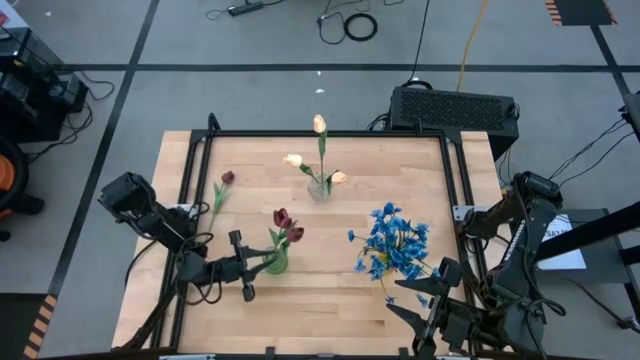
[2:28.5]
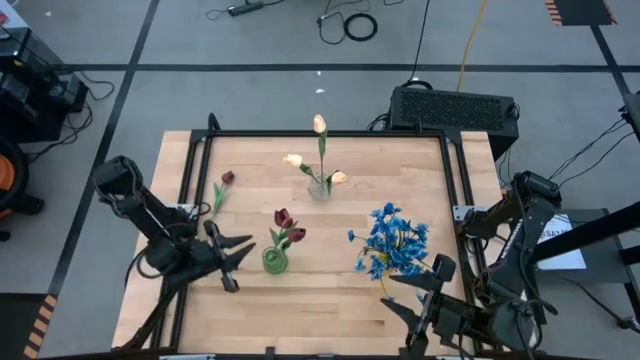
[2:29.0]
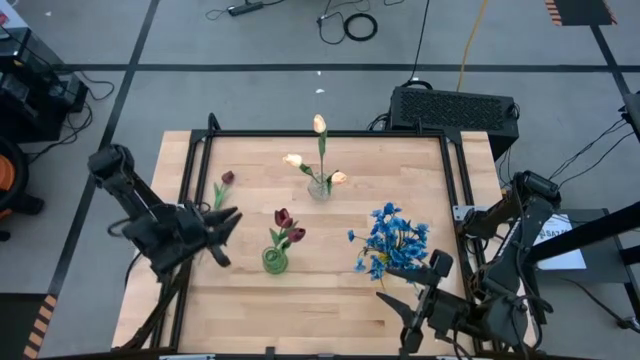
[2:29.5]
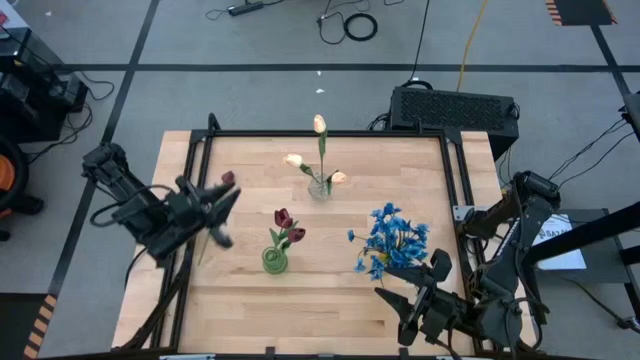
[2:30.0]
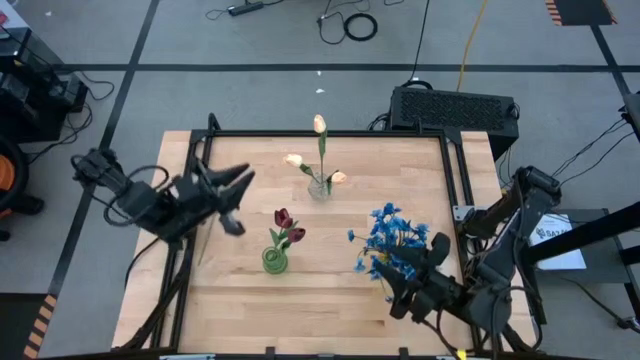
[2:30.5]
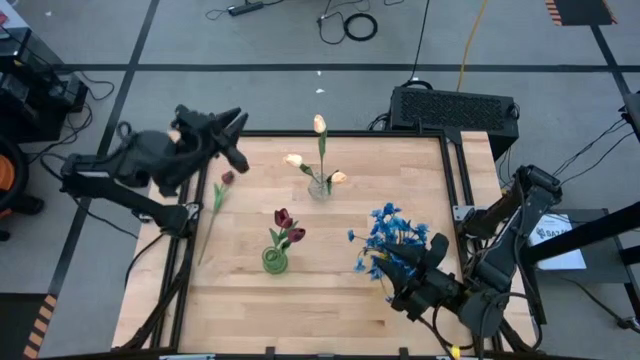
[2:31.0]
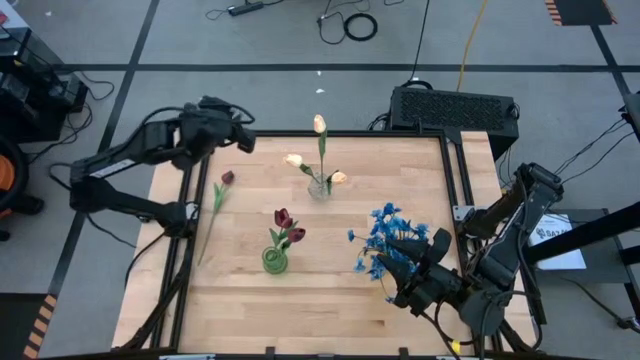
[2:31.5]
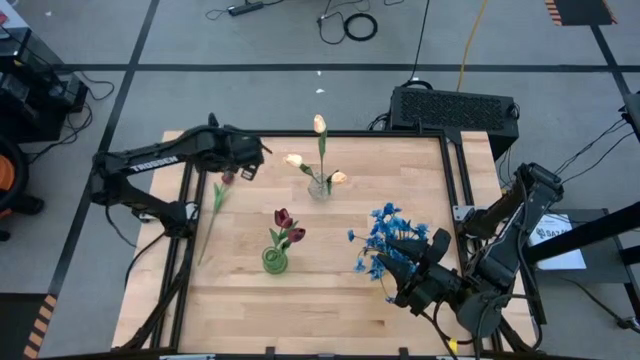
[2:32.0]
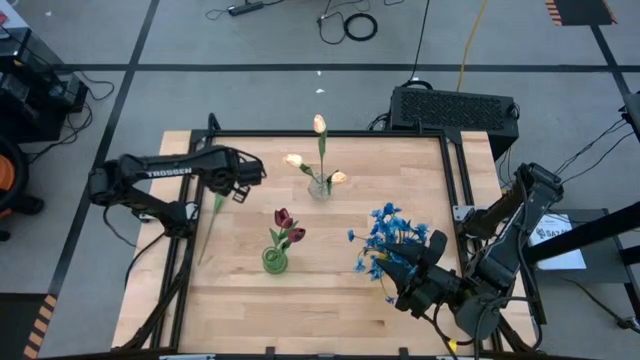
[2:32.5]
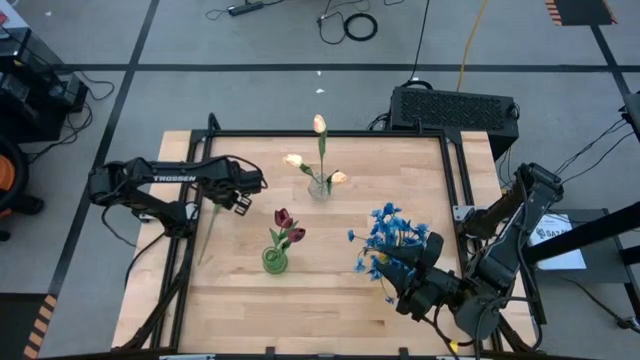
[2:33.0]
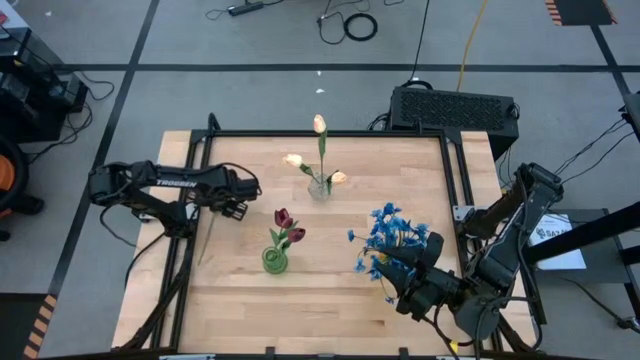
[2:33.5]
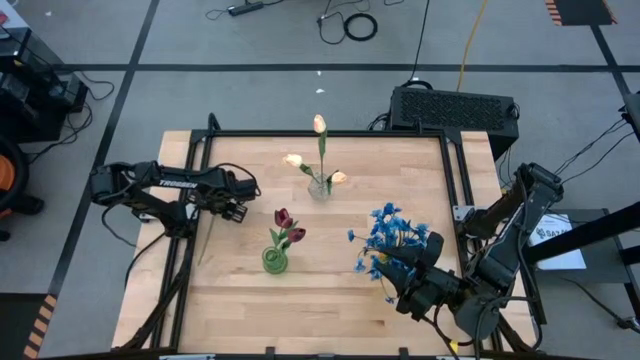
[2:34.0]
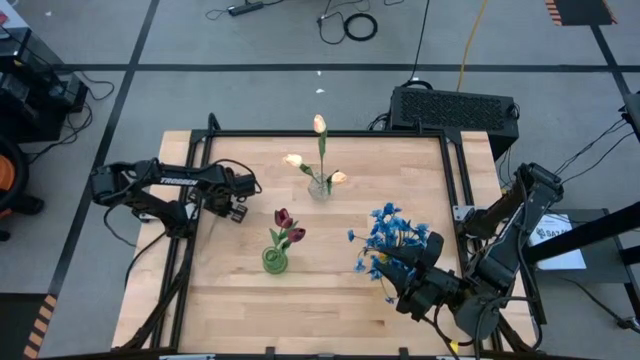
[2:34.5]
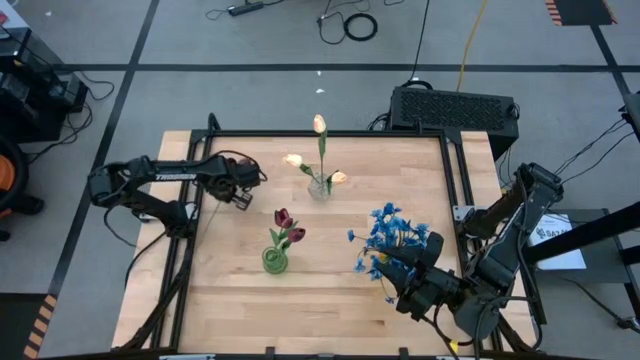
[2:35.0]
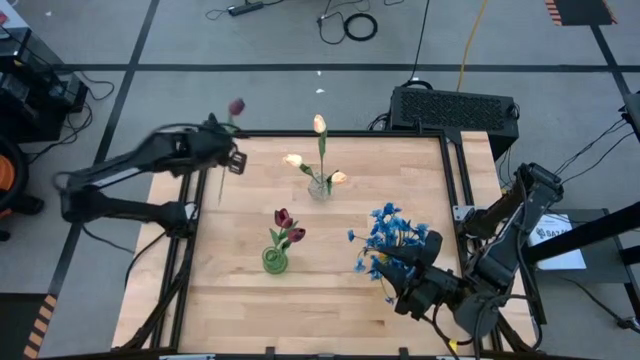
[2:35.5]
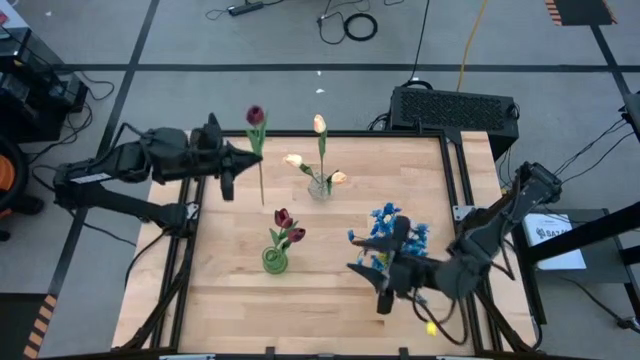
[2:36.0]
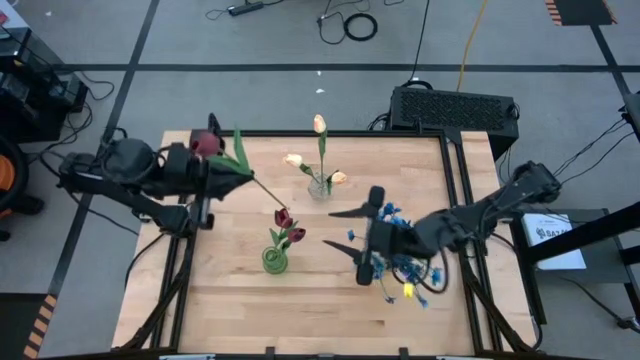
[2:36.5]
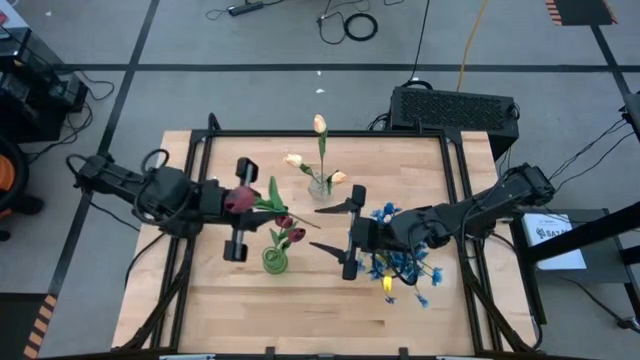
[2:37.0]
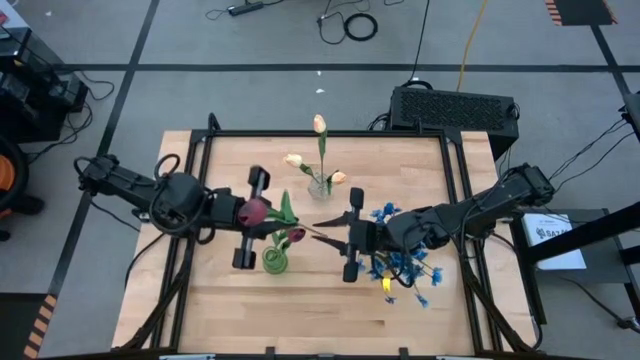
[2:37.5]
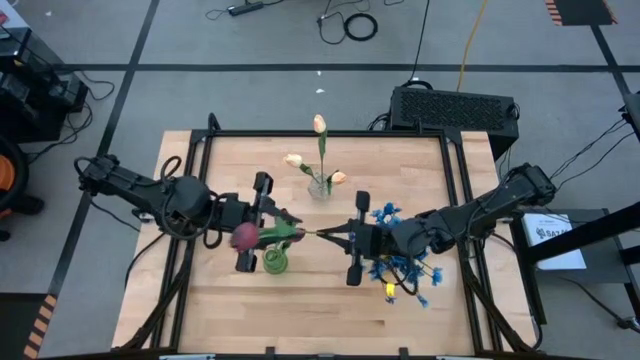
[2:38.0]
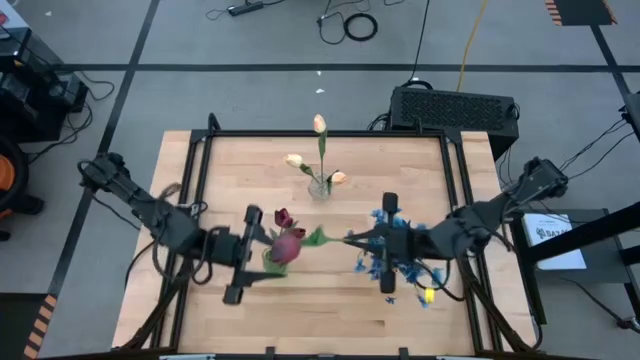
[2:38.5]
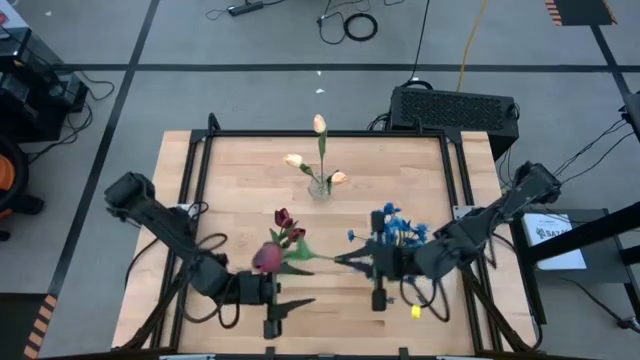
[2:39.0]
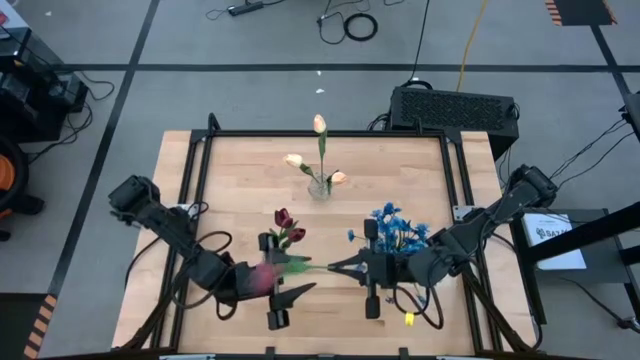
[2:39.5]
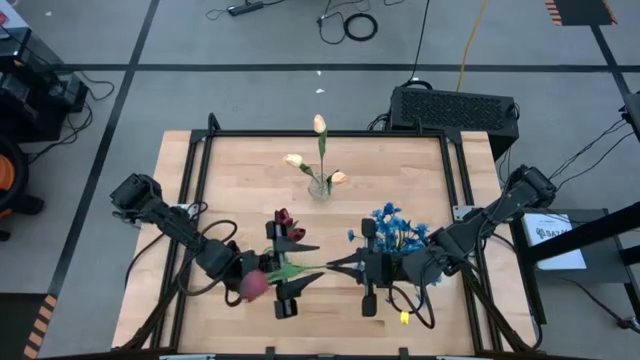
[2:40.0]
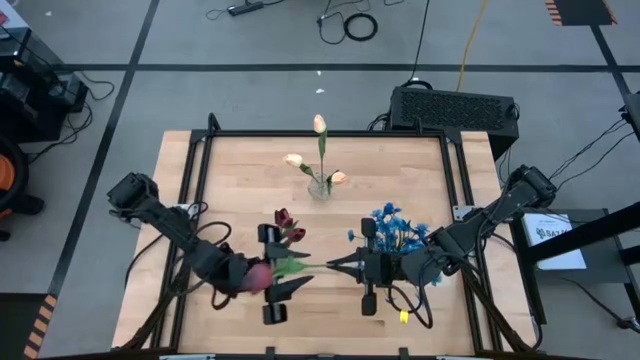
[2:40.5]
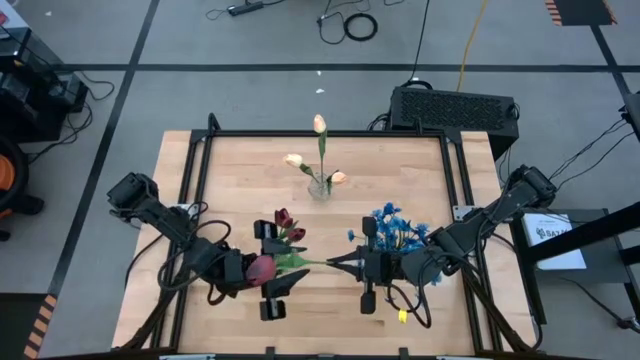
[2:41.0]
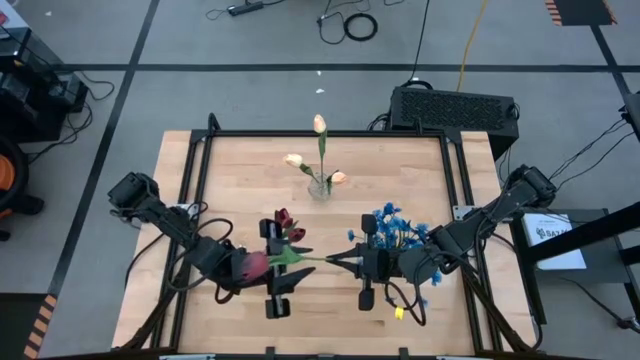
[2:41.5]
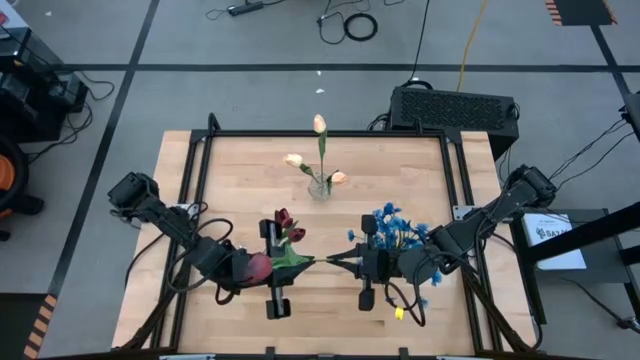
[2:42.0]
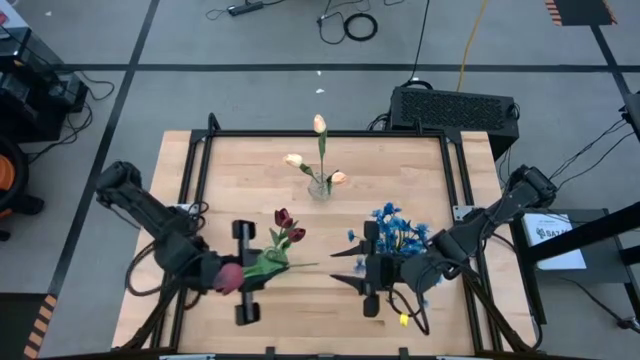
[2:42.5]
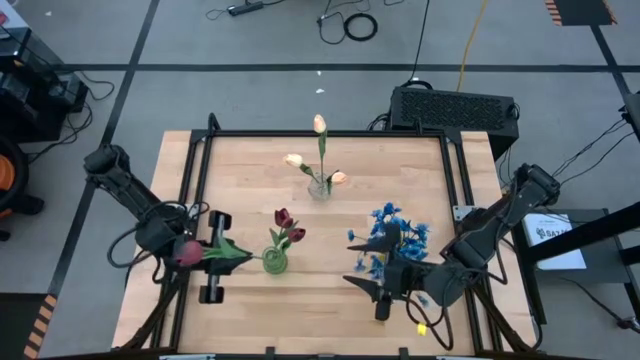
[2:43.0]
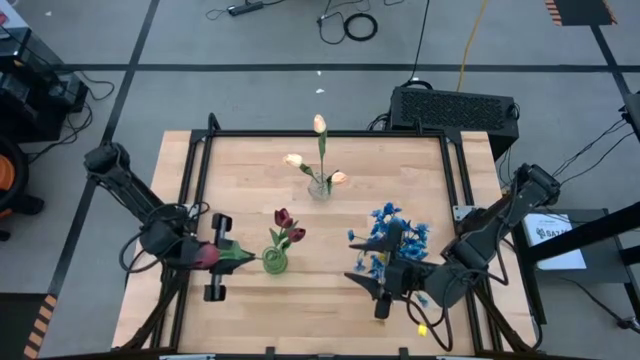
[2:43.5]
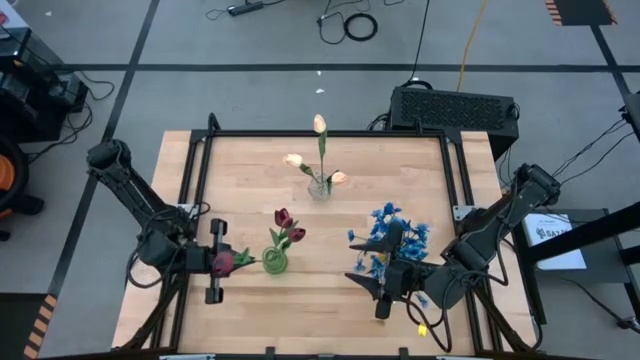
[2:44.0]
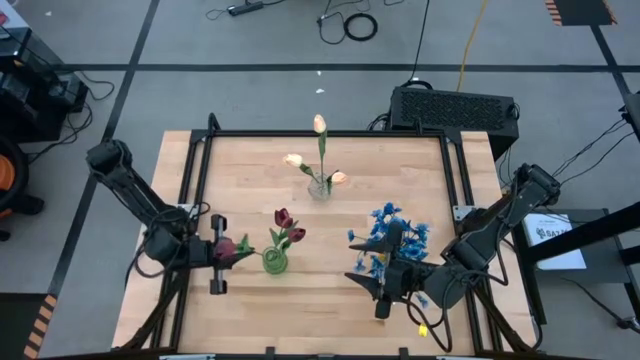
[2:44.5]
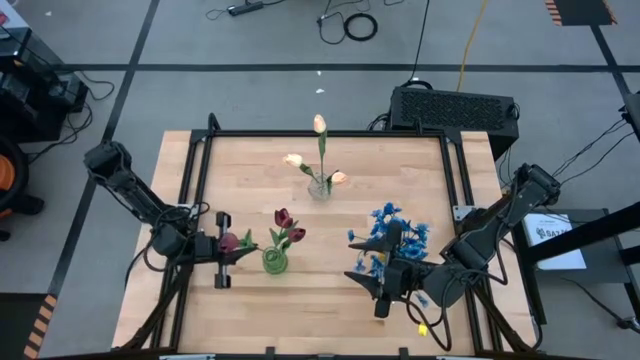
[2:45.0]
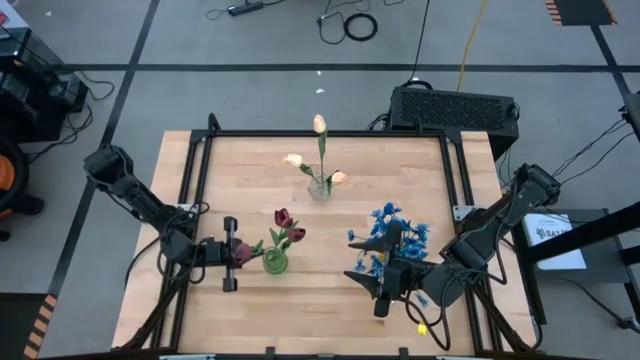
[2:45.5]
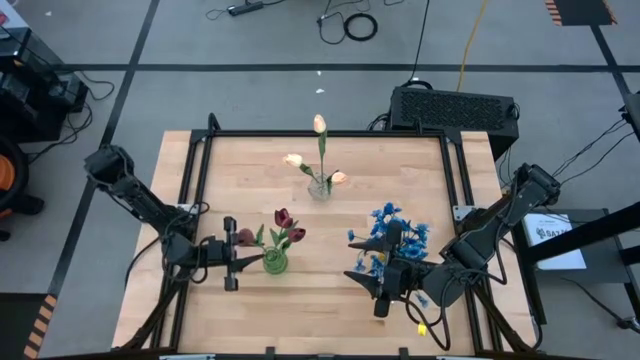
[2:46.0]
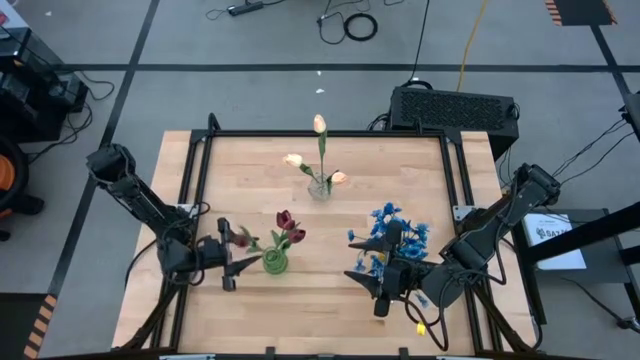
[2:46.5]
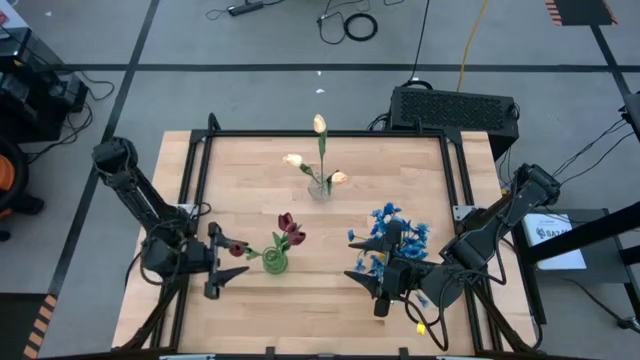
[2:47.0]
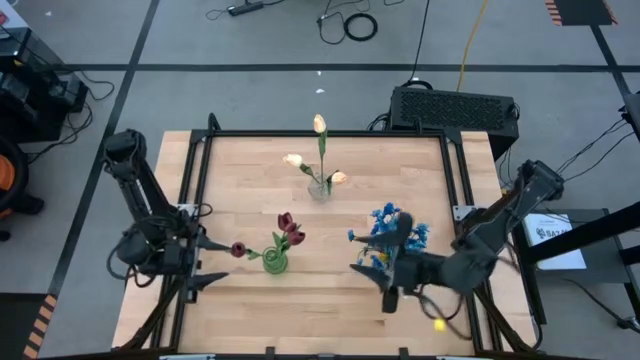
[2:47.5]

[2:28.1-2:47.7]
Task: Sort flowers into vase by color
Put the red flower into the green vase

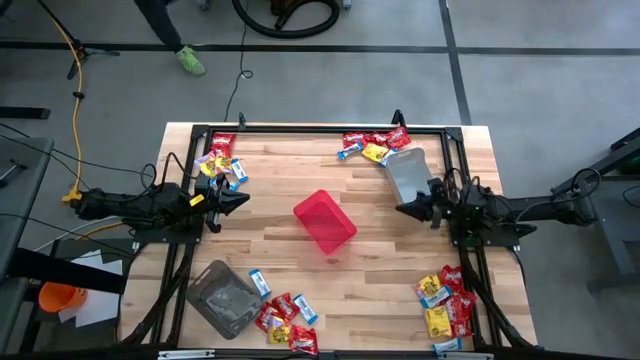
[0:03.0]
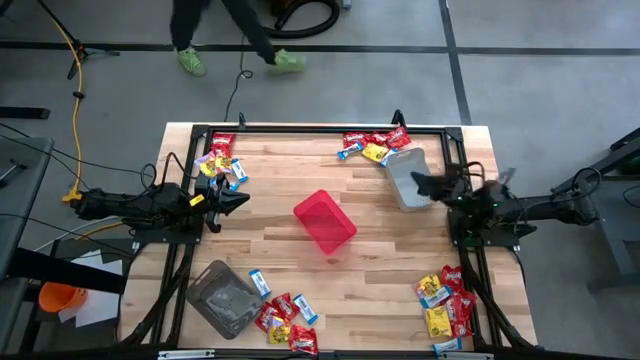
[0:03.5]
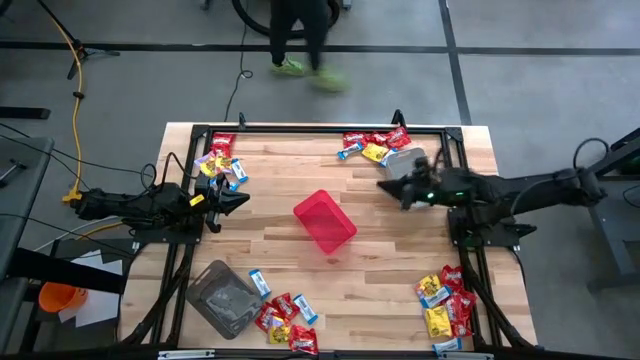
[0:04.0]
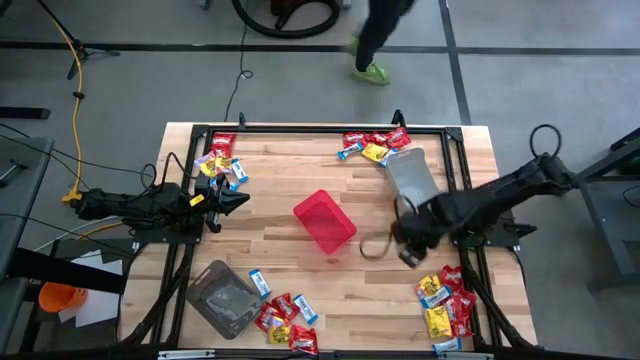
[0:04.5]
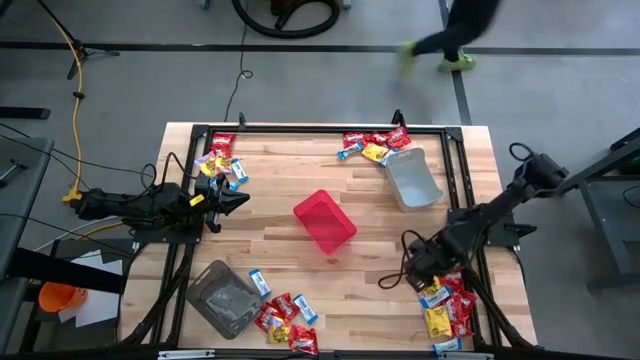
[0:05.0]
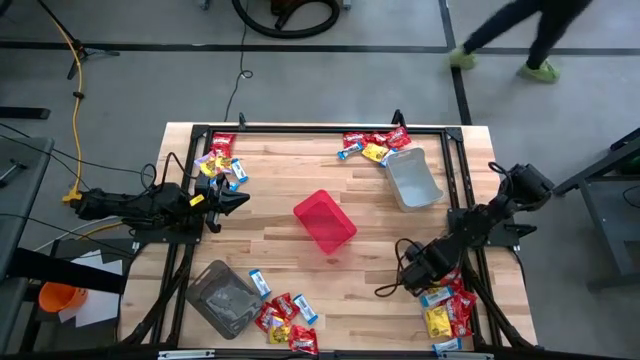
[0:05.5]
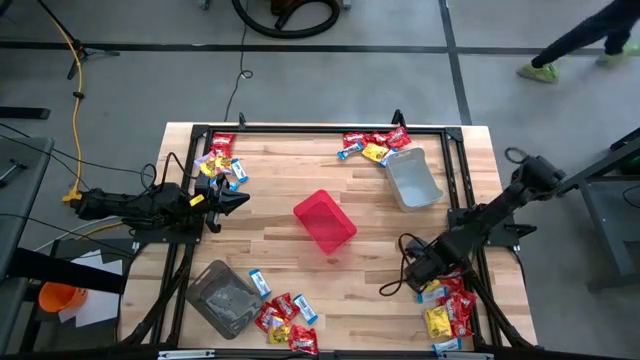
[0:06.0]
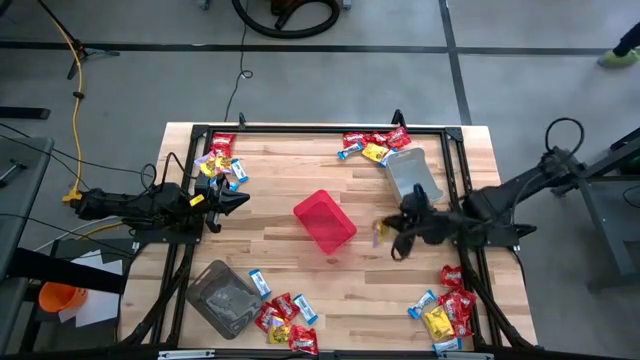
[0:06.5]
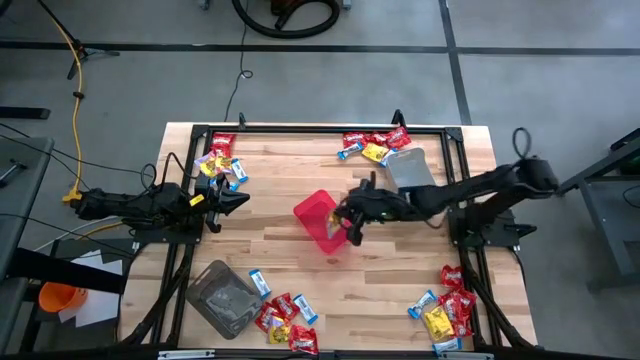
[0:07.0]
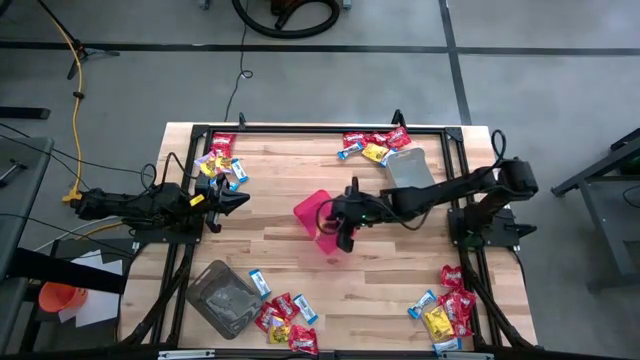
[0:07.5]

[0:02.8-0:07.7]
Task: Sort candy
Put the yellow candy into the red bin
